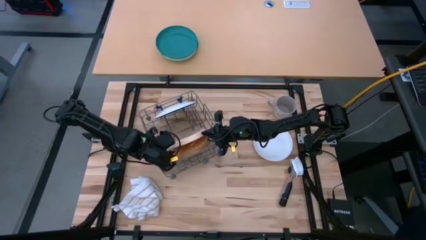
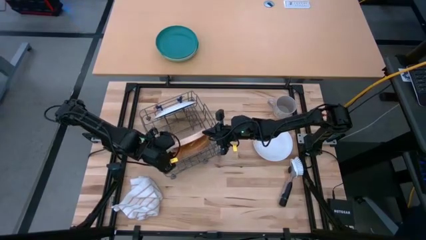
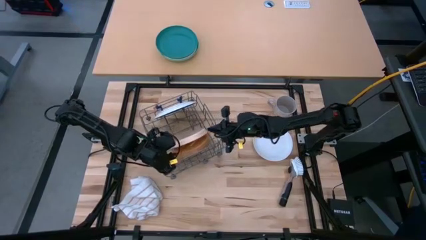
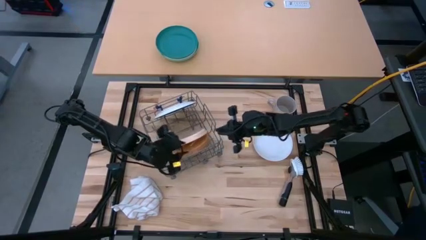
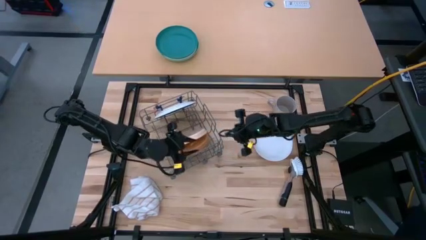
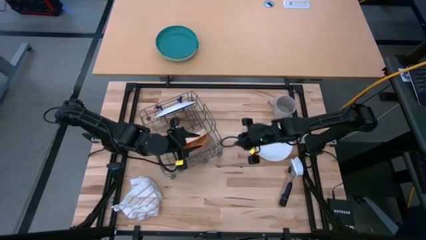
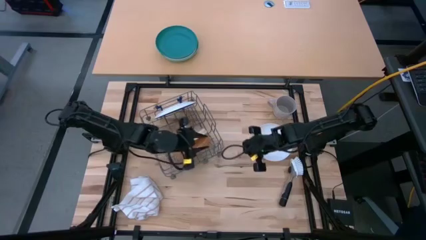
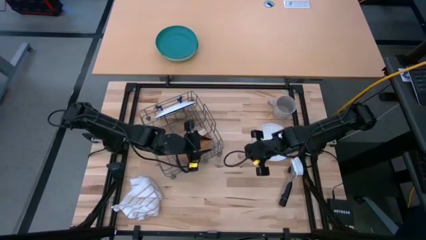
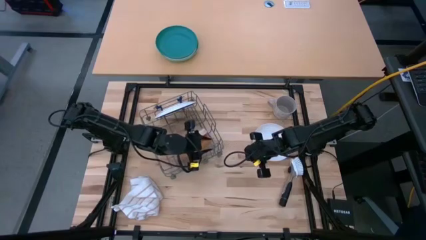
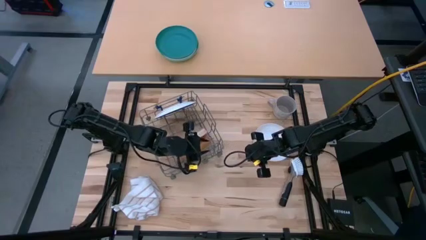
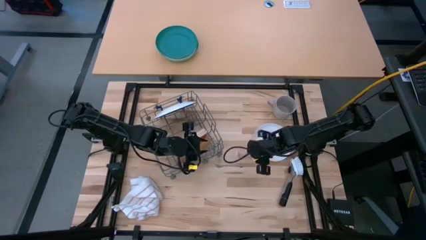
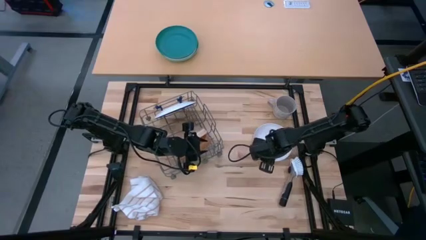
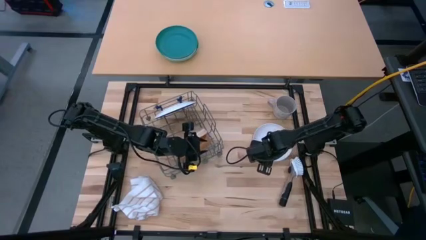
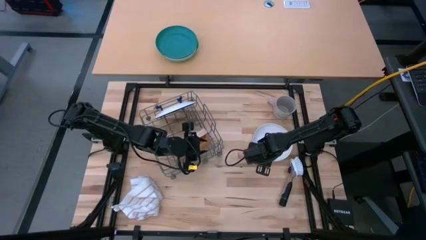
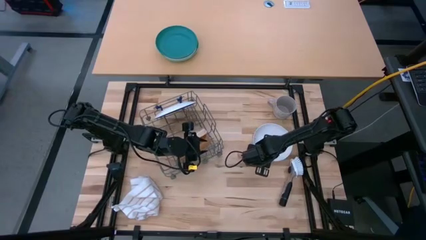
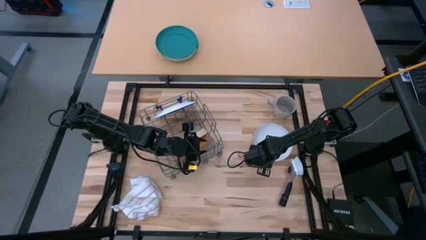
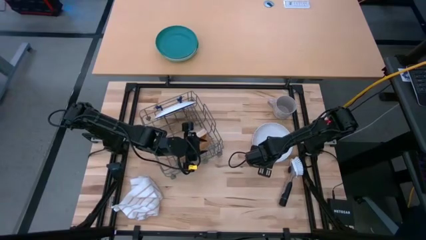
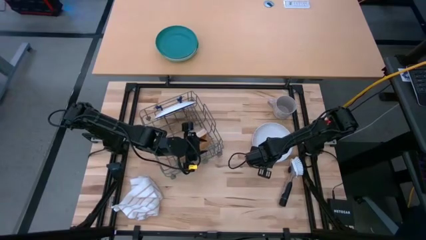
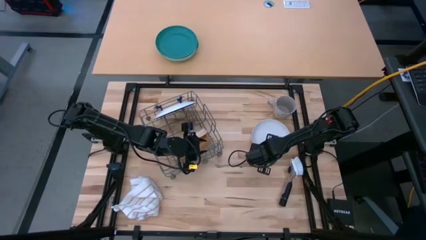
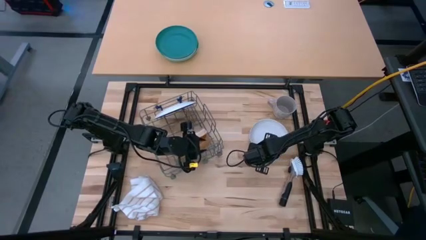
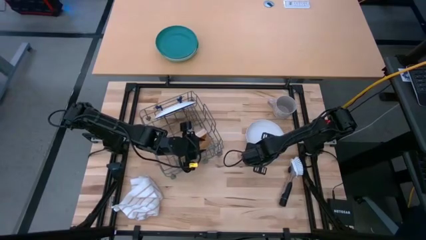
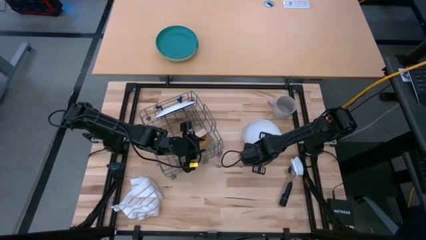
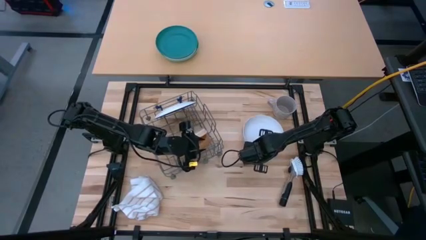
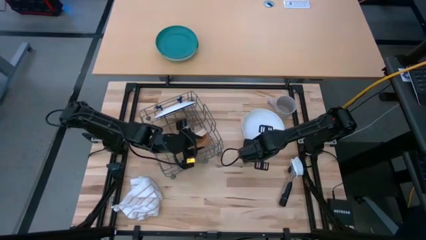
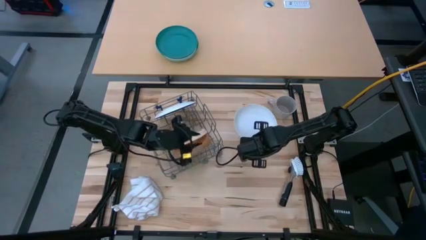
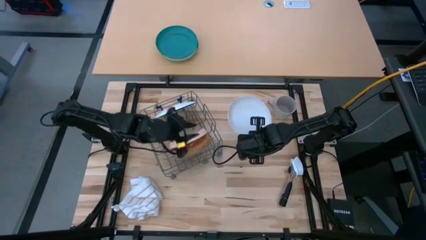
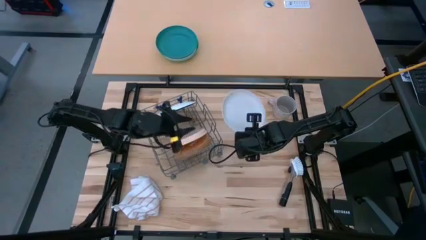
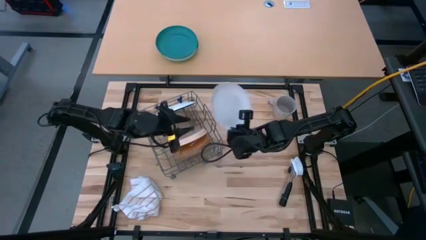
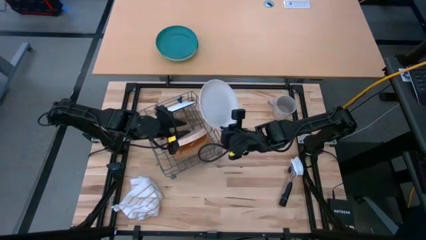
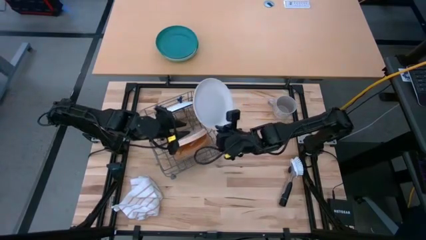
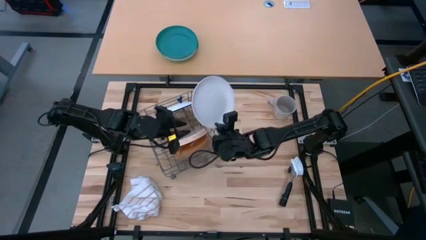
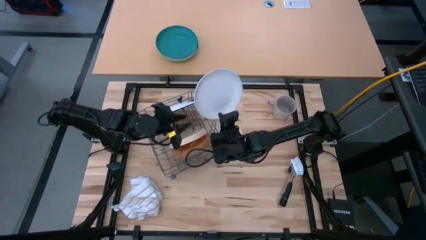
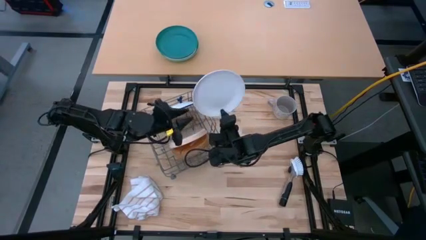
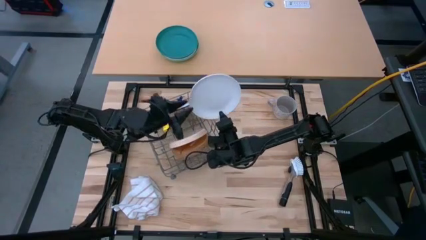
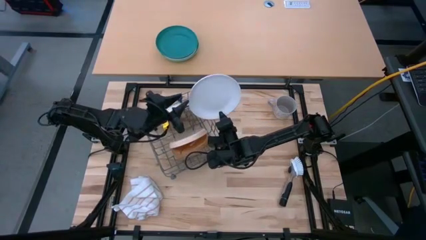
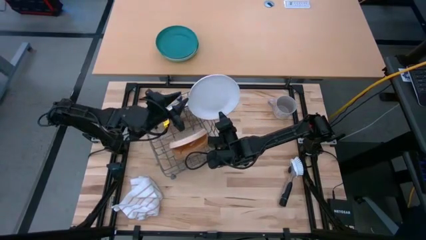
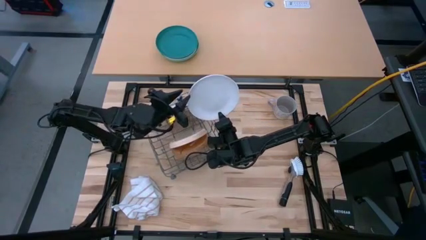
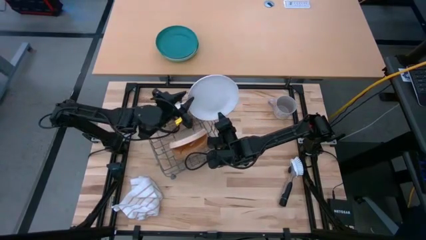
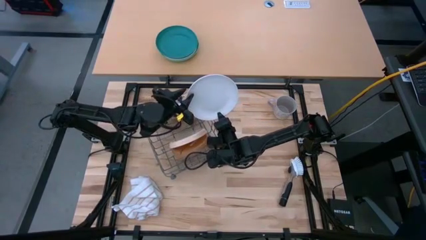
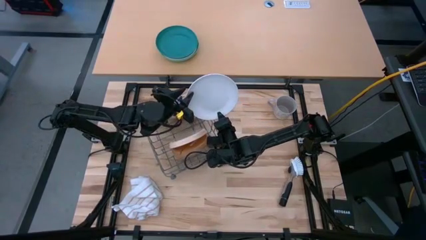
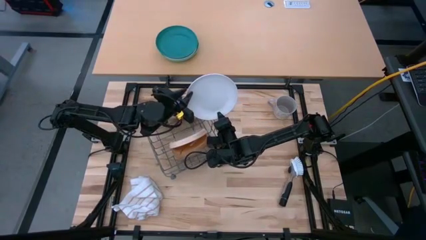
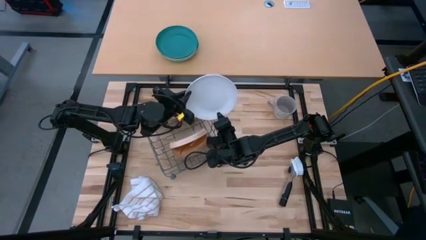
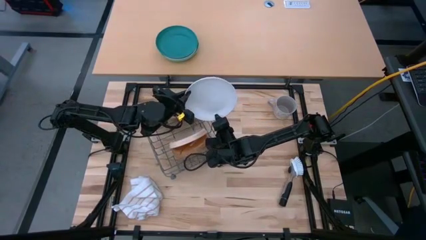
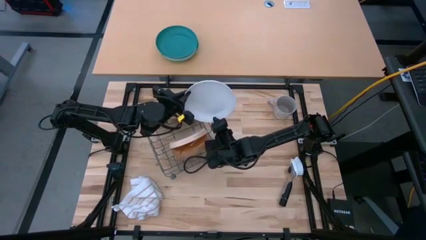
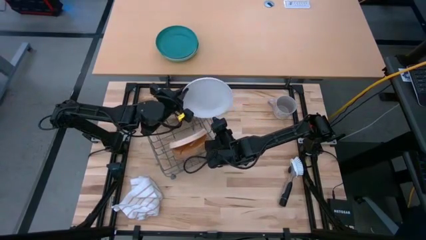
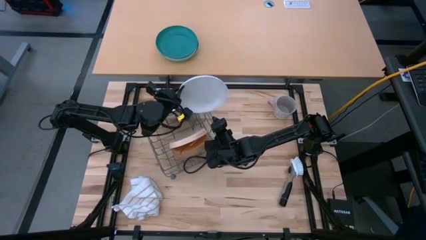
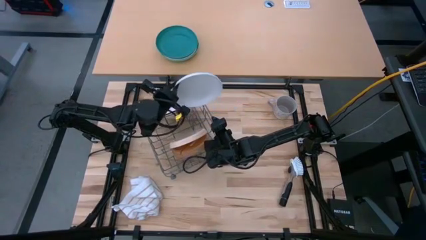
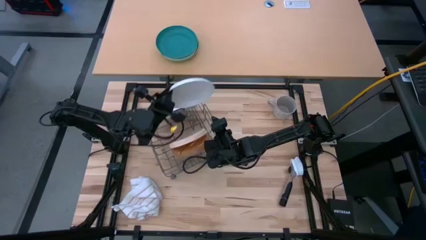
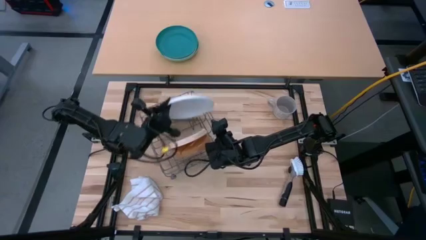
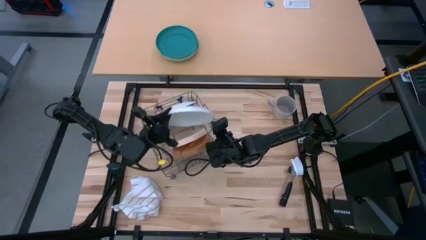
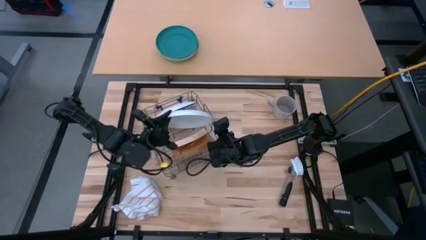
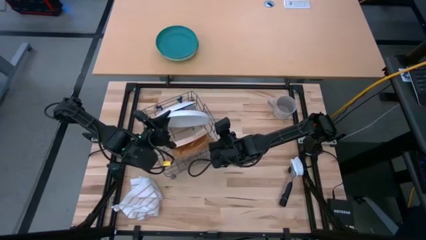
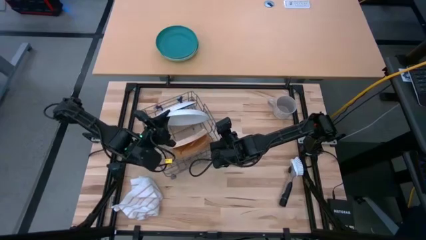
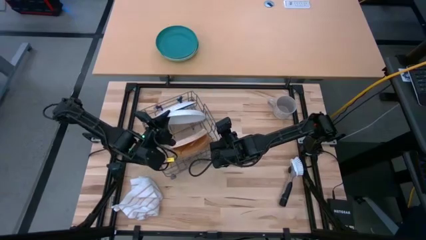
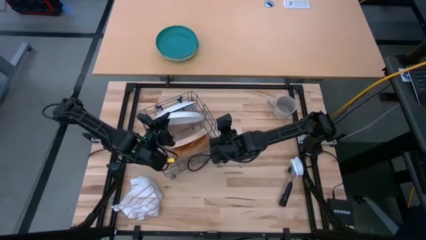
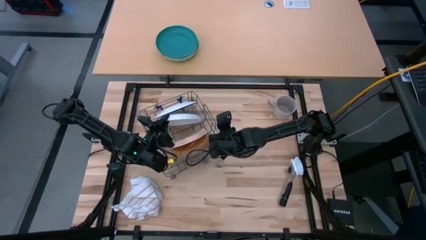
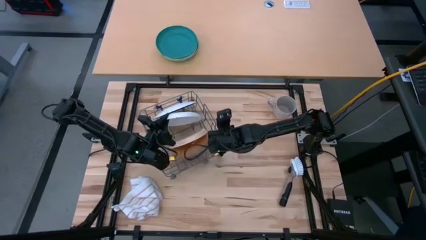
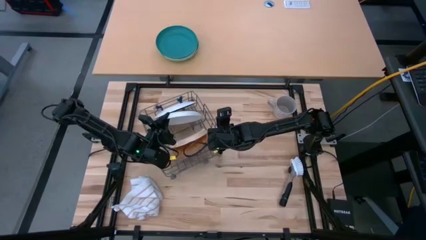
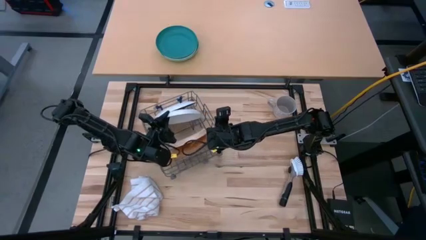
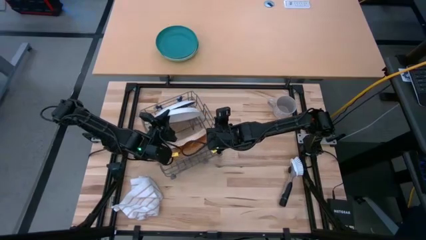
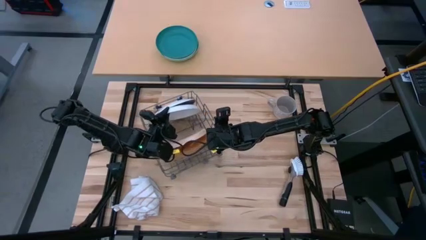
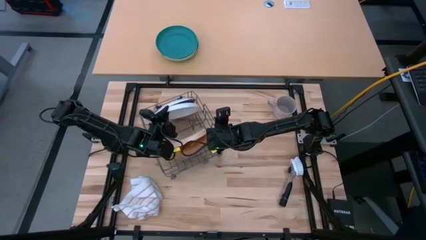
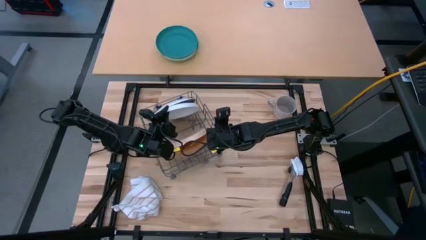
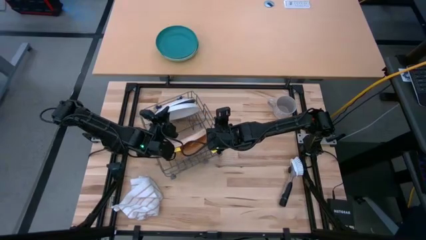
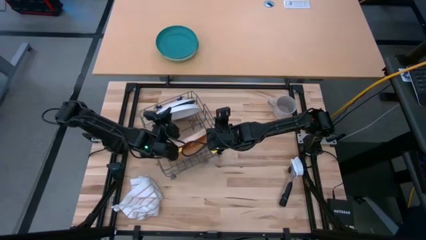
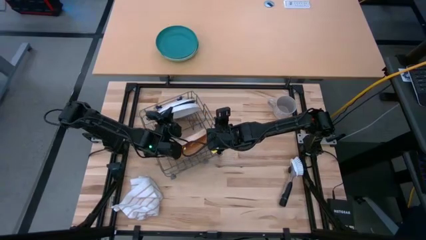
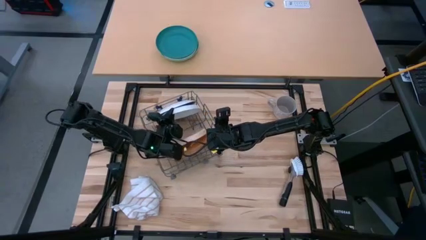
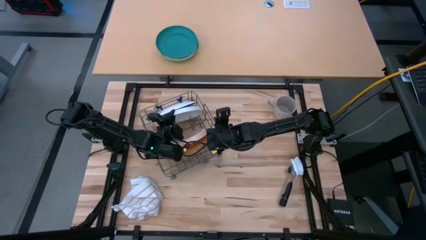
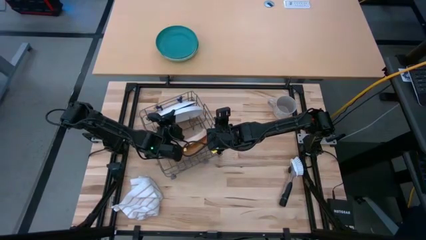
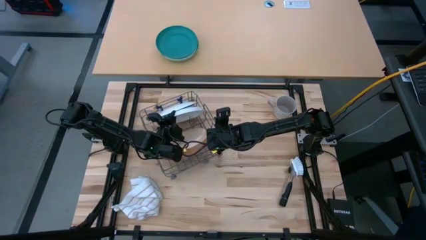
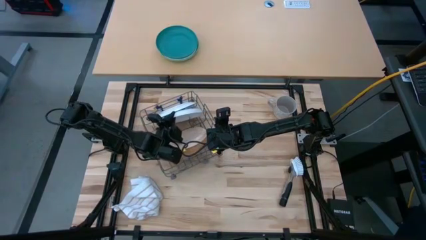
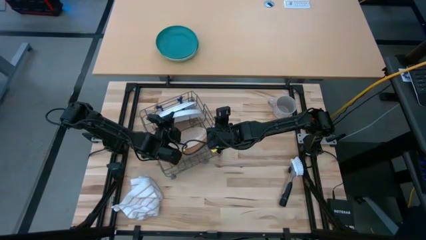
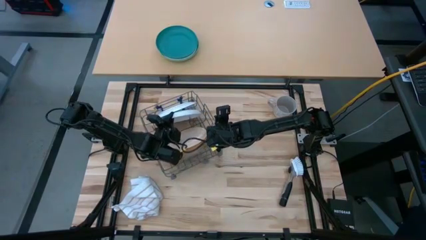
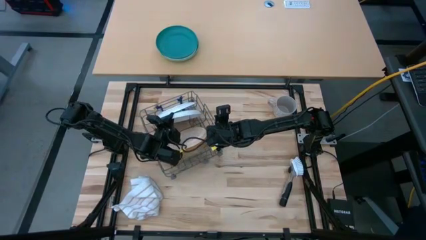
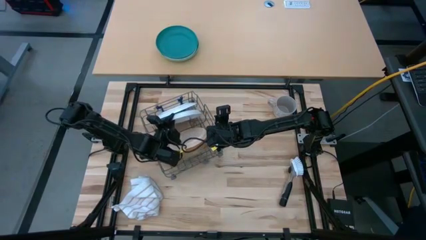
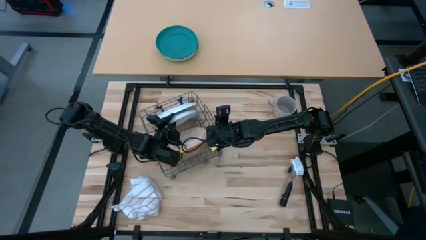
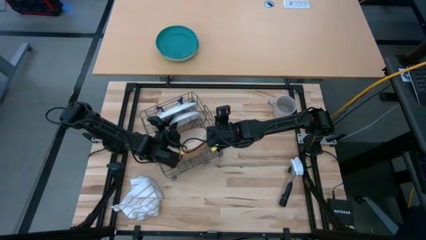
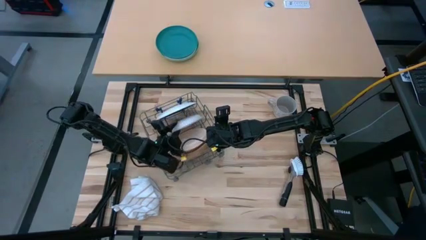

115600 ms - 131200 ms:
Task: Sort dishes
Put the white plate in the dish rack
